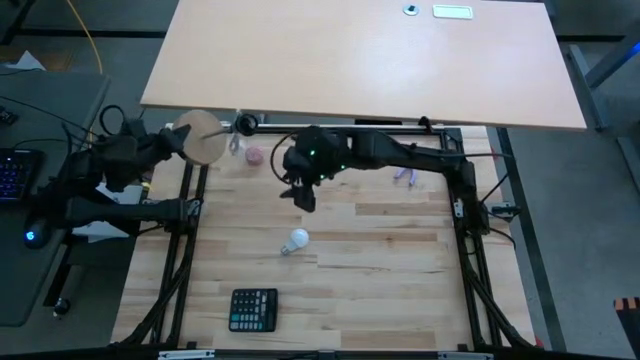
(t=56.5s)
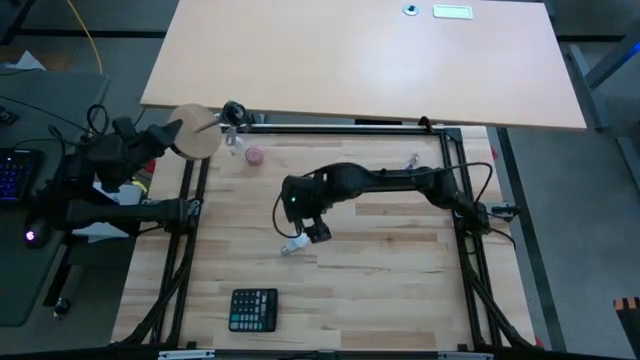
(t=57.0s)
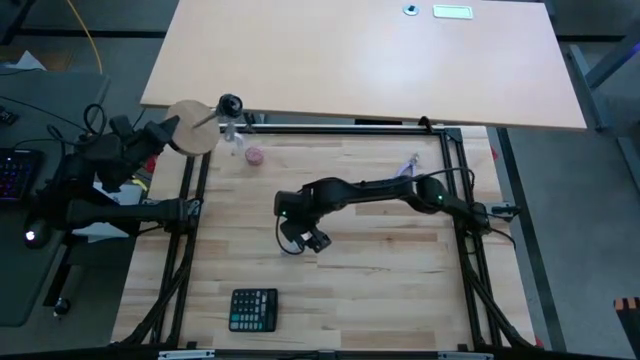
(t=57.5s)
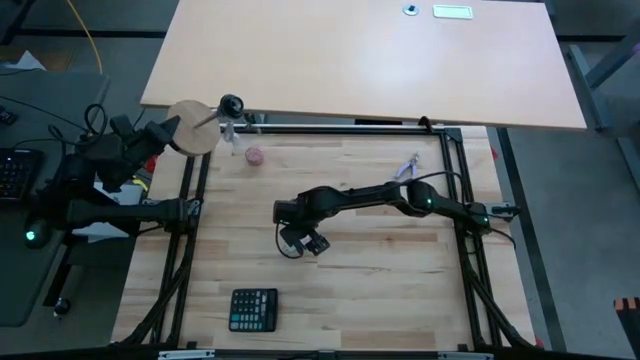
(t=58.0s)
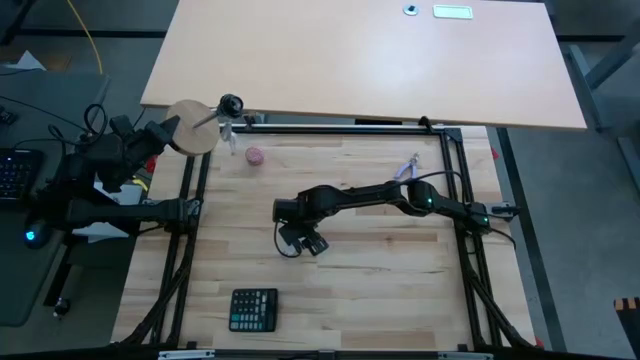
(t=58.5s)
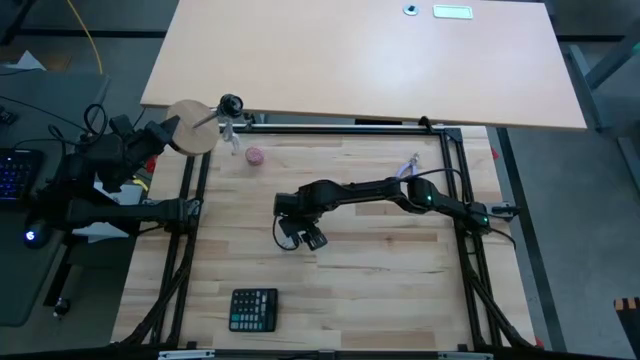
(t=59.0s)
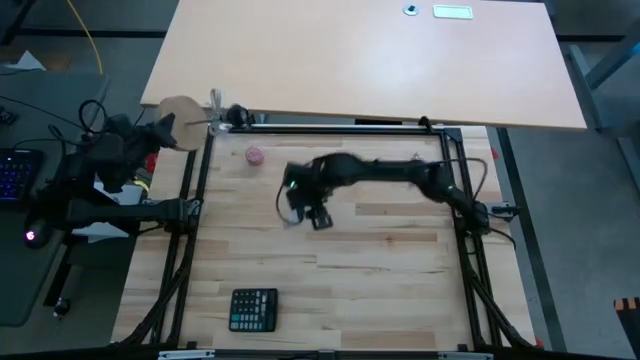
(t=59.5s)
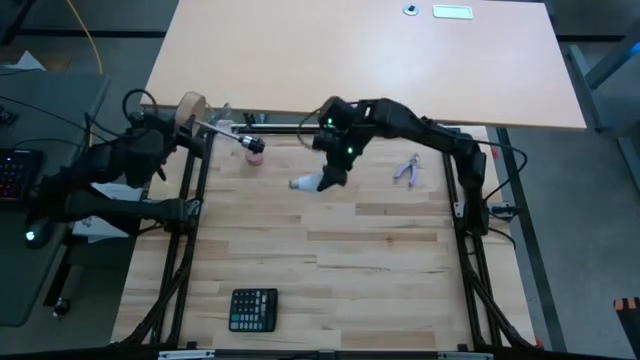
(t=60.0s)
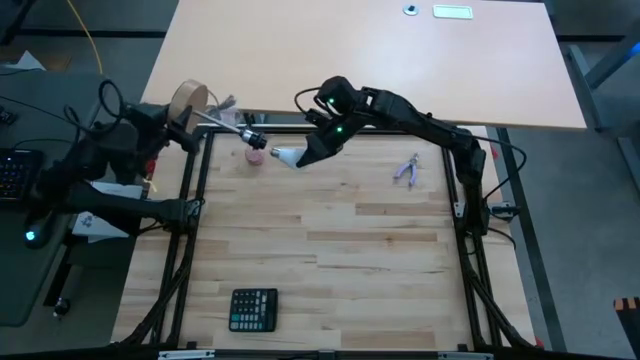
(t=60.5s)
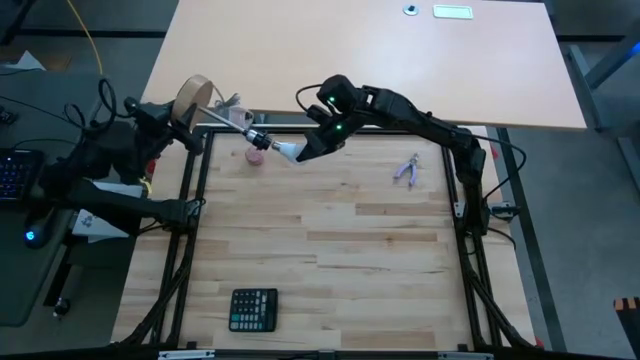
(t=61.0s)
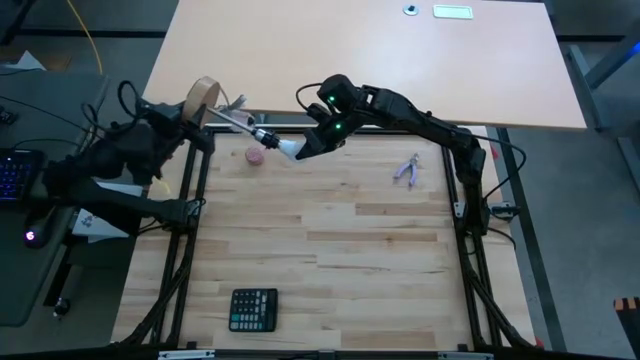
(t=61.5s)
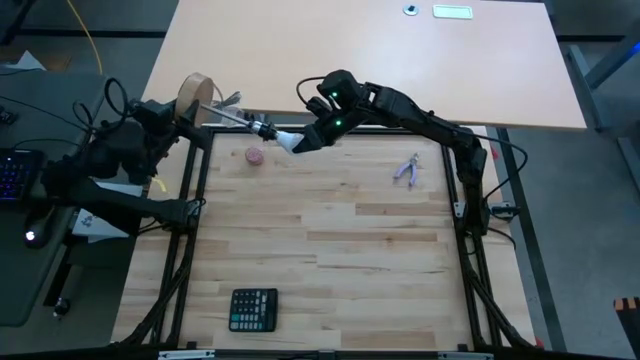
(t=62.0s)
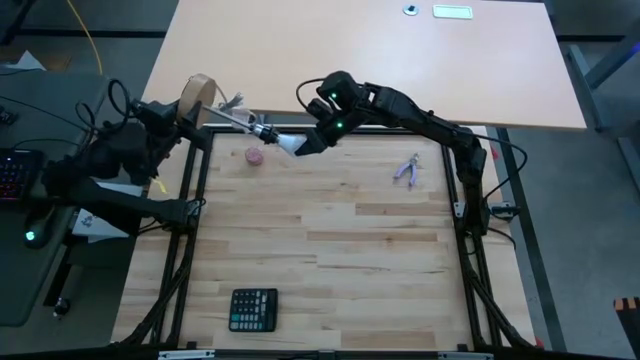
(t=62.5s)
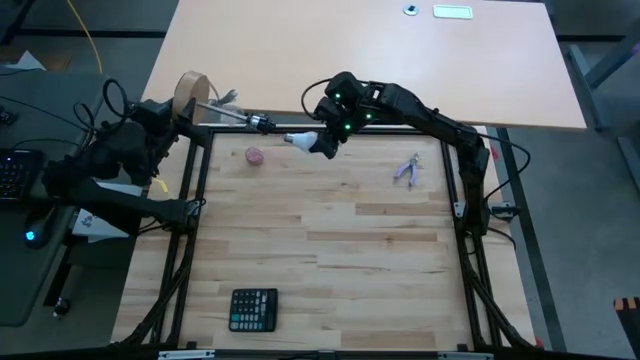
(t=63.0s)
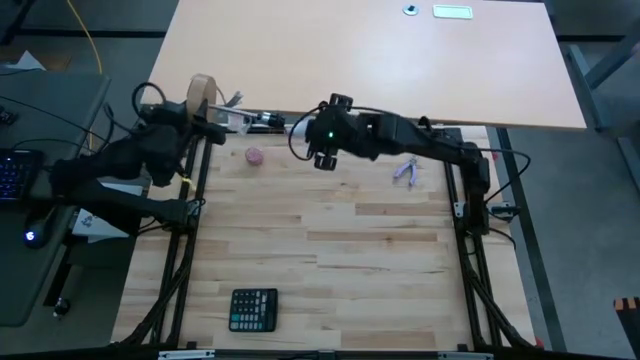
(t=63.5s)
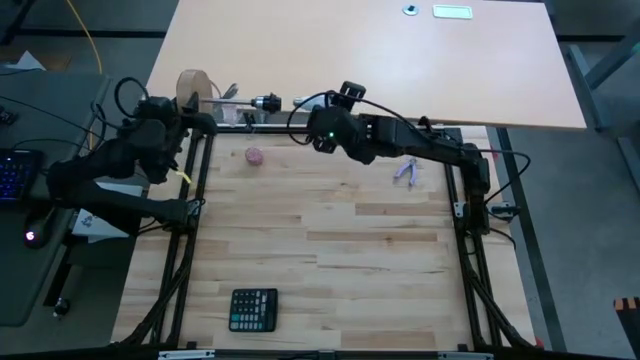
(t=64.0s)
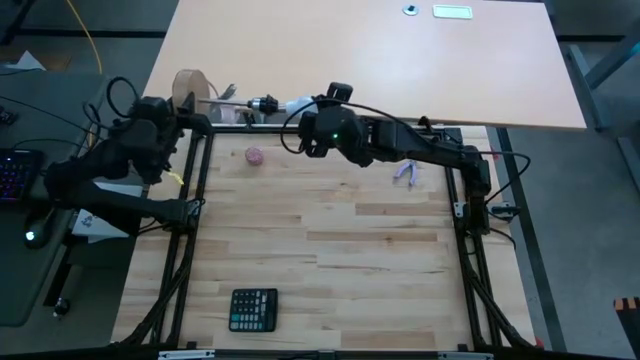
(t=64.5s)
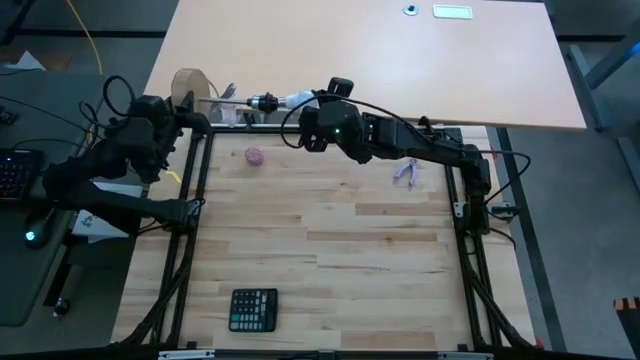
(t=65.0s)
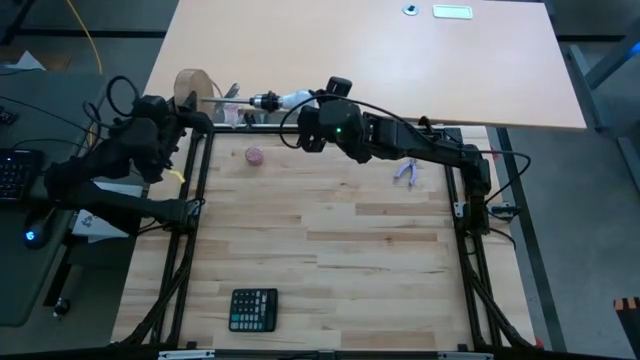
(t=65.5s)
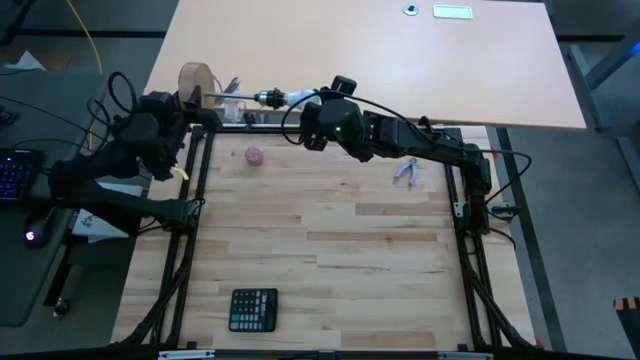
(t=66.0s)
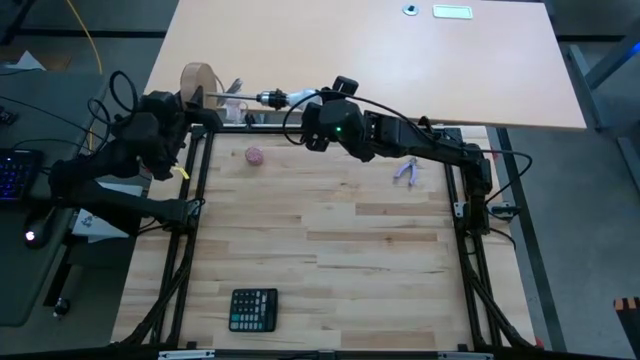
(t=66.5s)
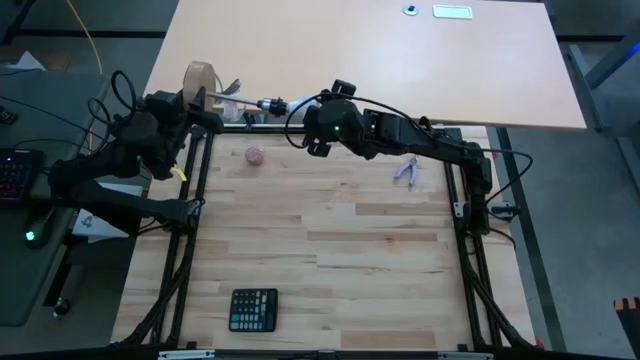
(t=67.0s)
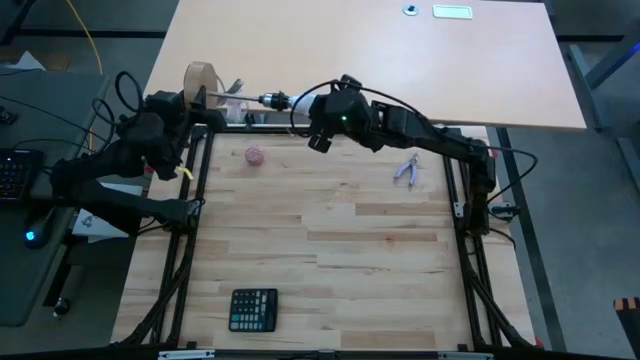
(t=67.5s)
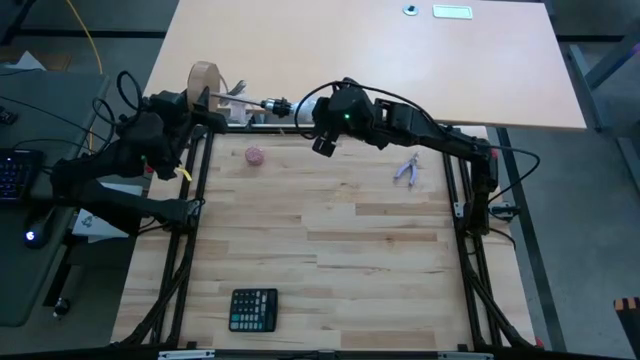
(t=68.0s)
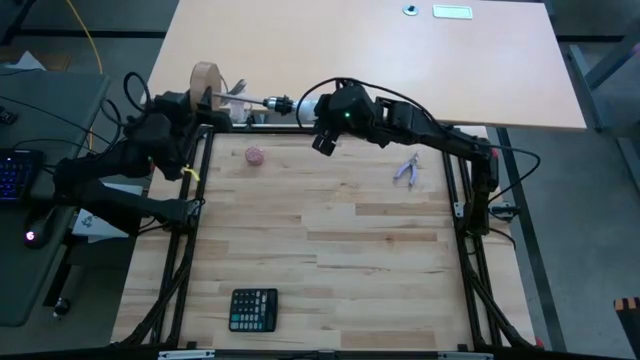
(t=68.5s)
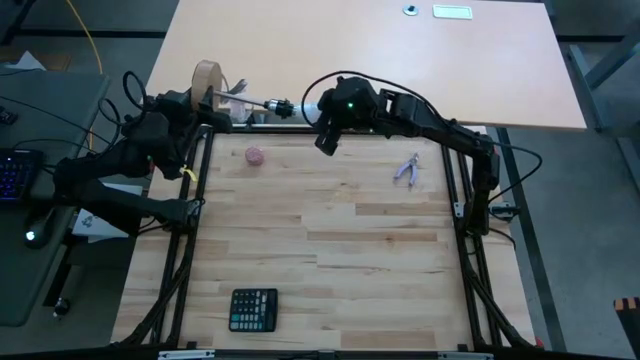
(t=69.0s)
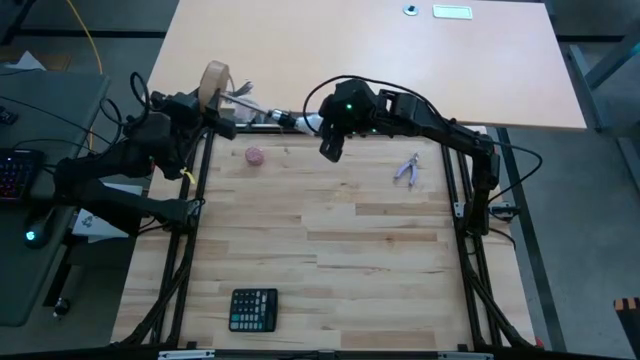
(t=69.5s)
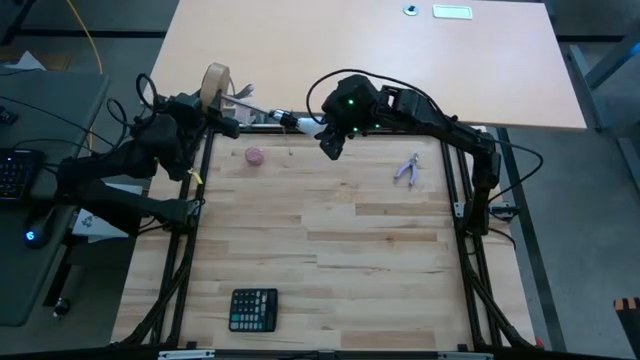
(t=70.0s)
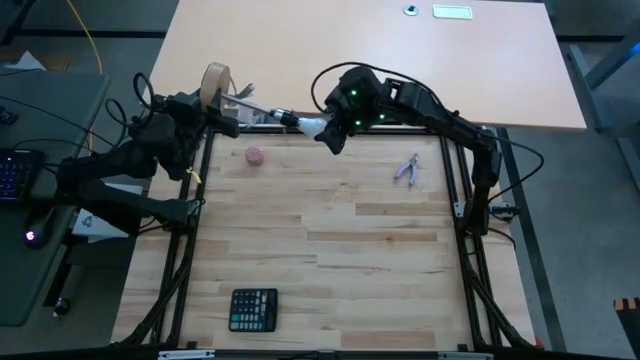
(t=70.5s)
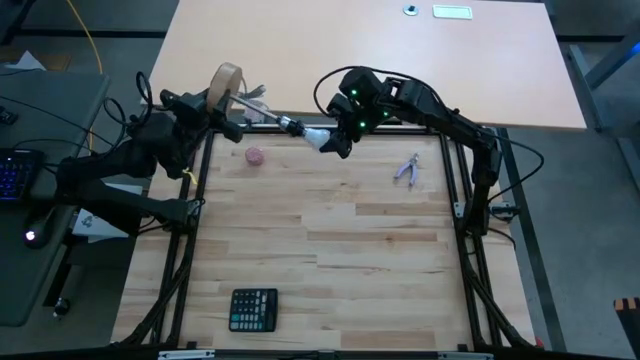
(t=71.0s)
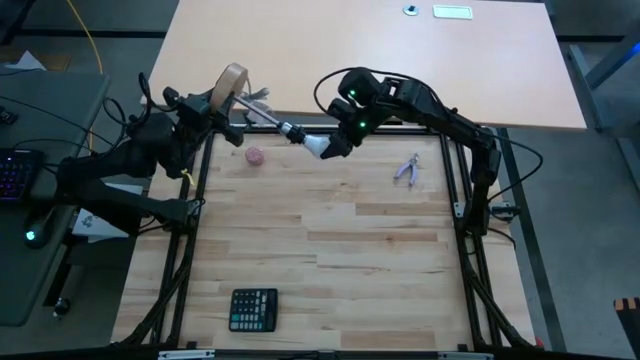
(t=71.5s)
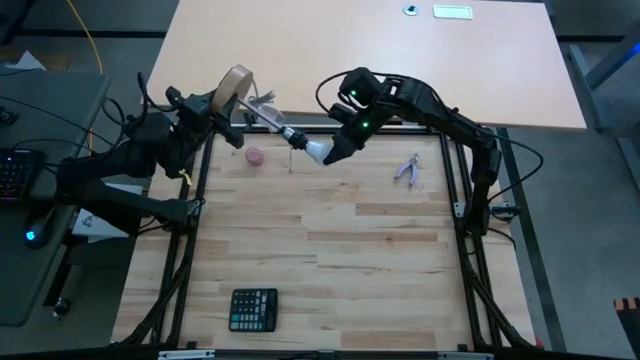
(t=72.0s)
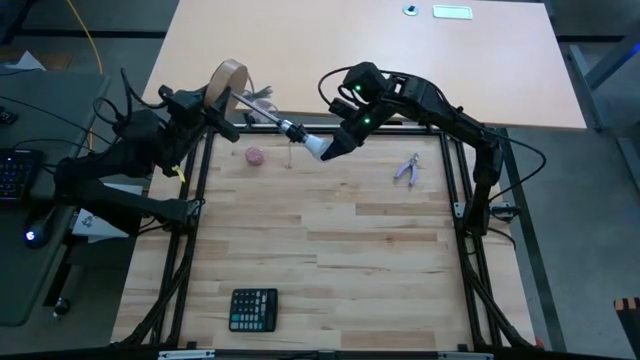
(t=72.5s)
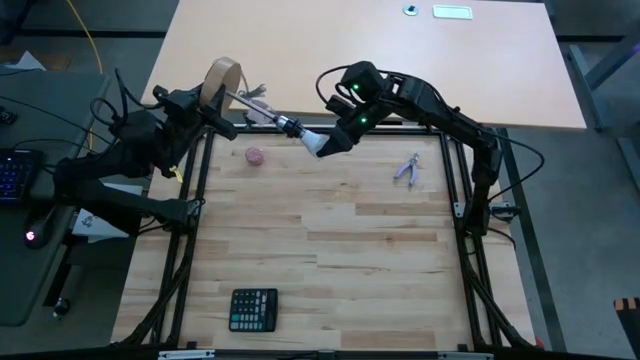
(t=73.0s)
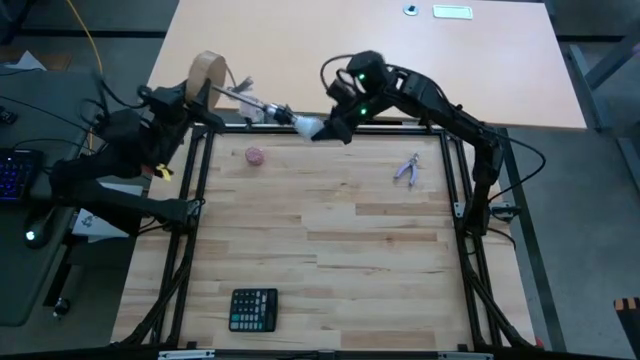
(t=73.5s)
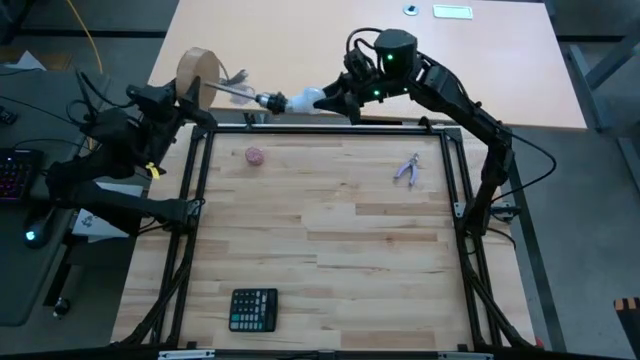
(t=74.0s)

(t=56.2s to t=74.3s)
Task: Screw lightbulb
Insert the white lightbulb into the brown lamp

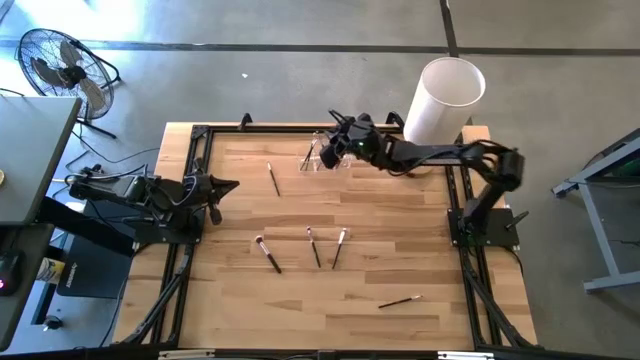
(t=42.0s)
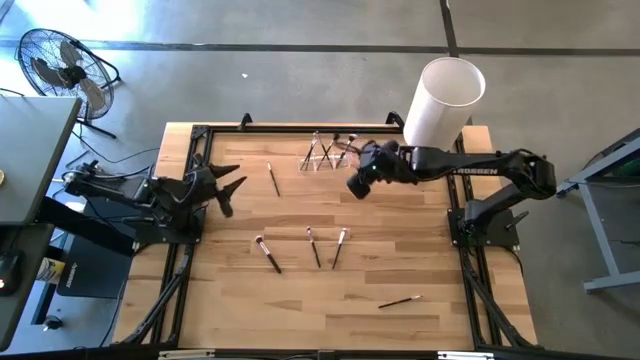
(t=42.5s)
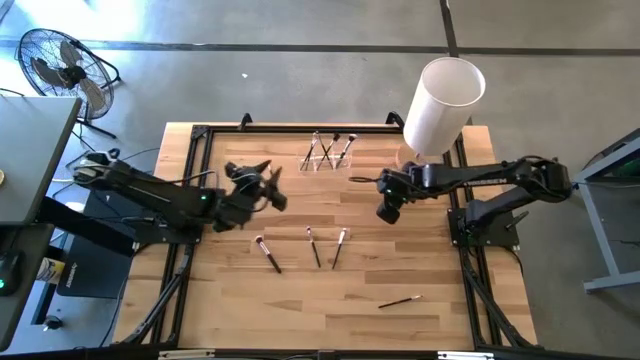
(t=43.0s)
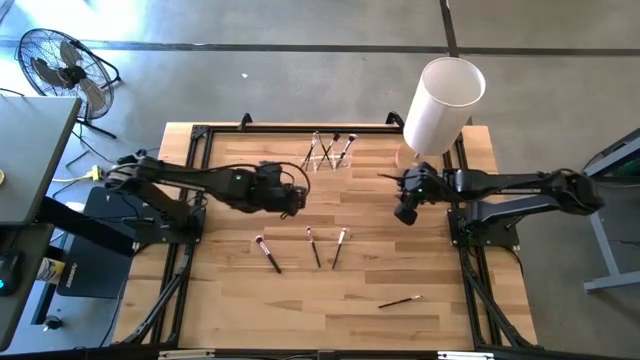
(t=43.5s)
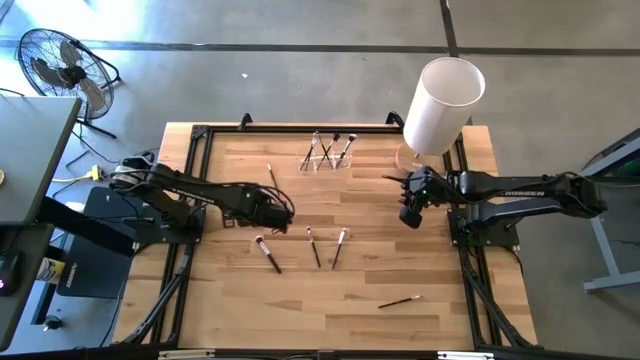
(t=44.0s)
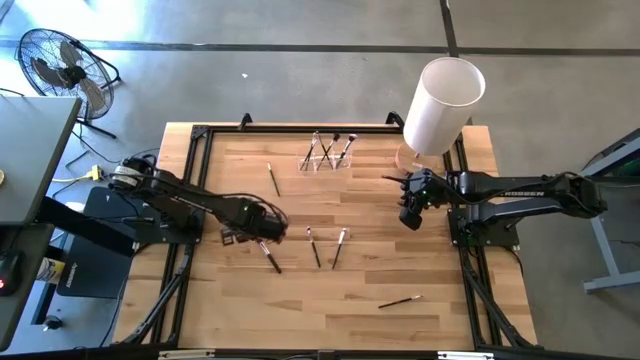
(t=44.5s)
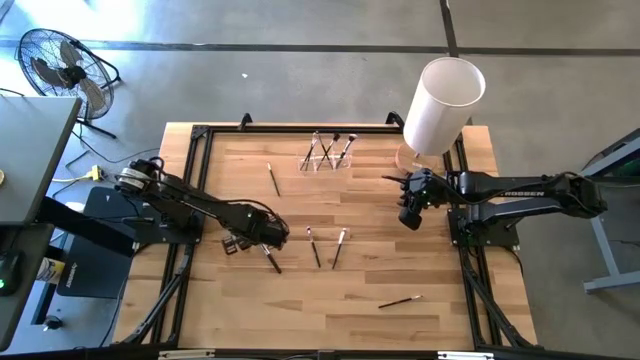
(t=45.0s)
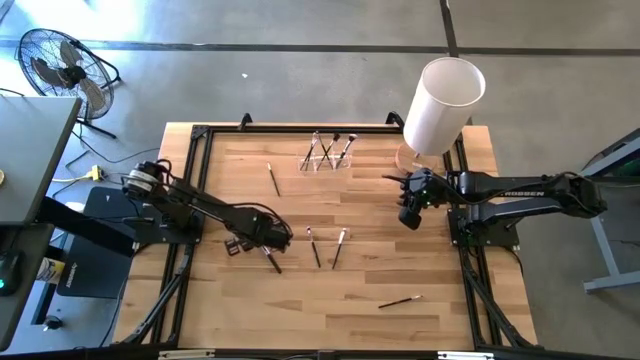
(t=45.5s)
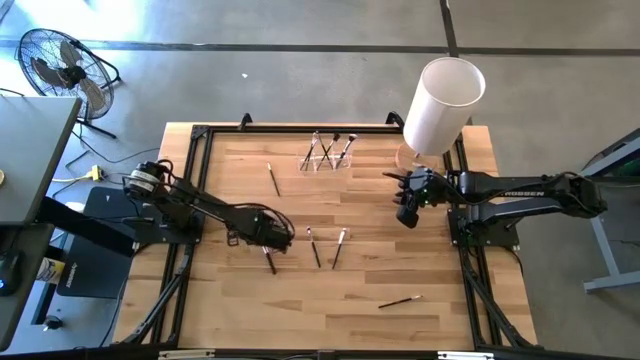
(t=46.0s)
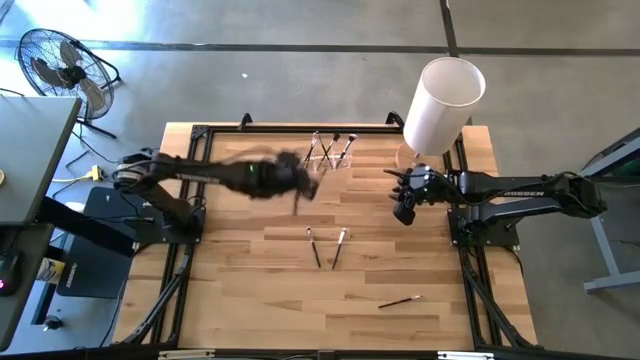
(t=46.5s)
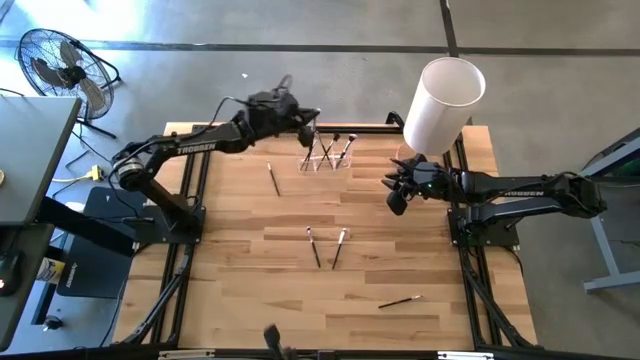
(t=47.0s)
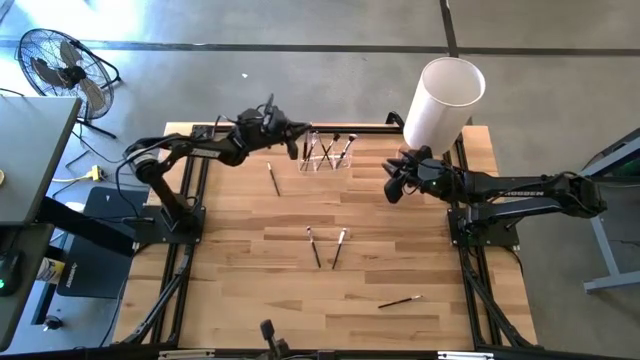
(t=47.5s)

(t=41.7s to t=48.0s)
Task: Pick & Place Makeup Brushes
Put the black blush brush into the transparent organizer
